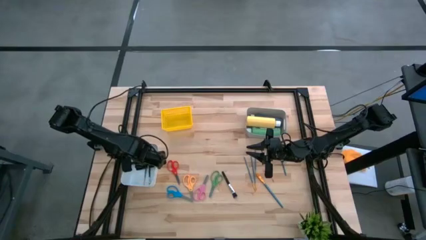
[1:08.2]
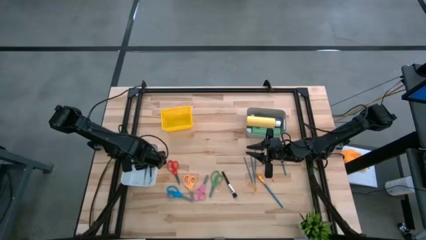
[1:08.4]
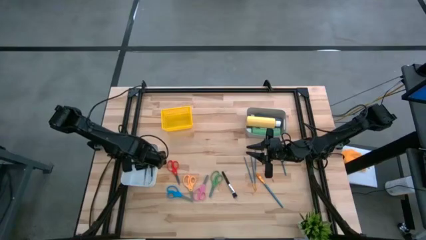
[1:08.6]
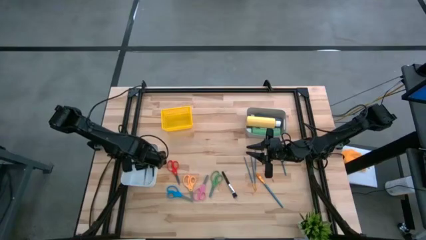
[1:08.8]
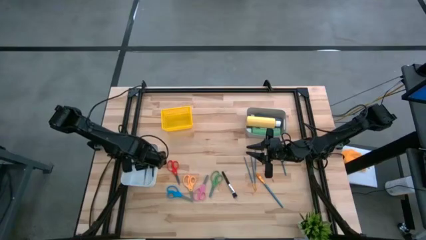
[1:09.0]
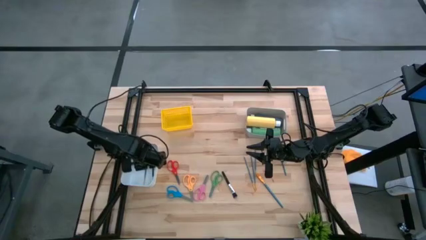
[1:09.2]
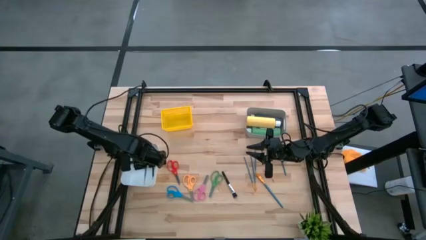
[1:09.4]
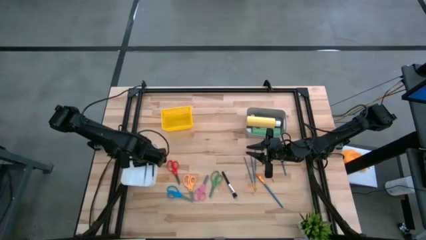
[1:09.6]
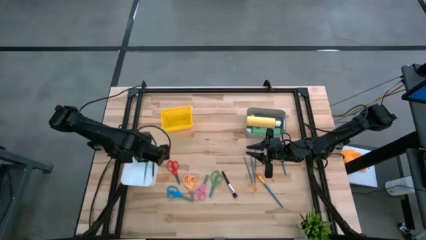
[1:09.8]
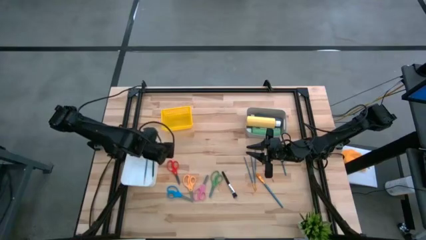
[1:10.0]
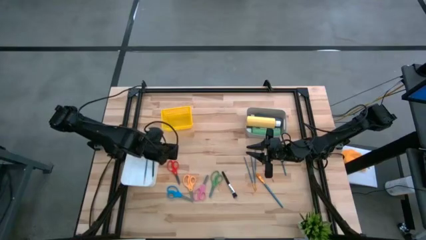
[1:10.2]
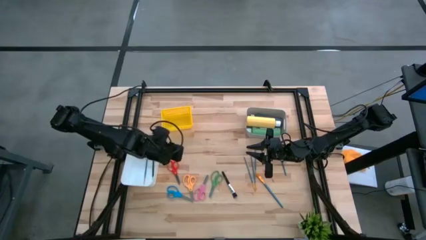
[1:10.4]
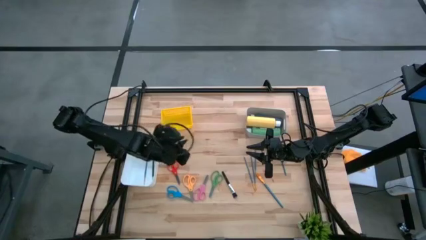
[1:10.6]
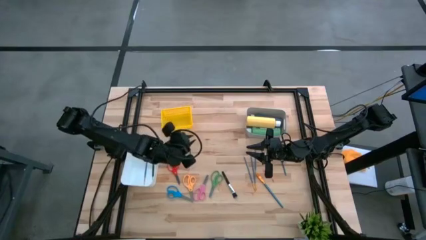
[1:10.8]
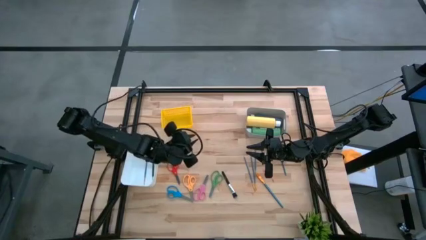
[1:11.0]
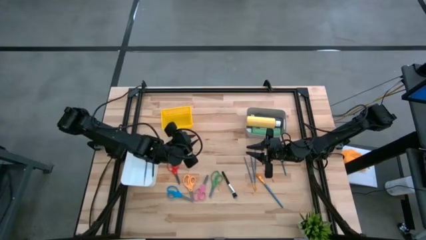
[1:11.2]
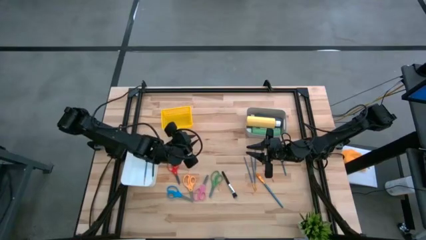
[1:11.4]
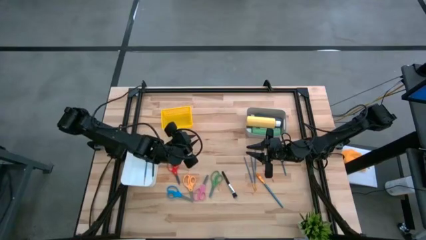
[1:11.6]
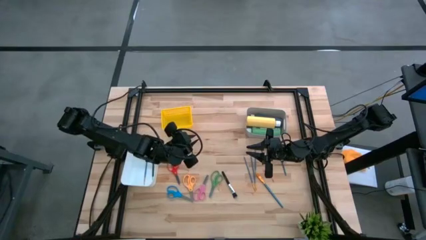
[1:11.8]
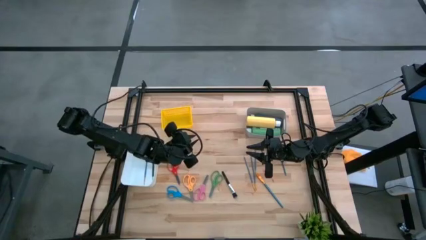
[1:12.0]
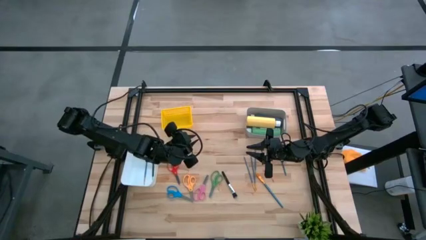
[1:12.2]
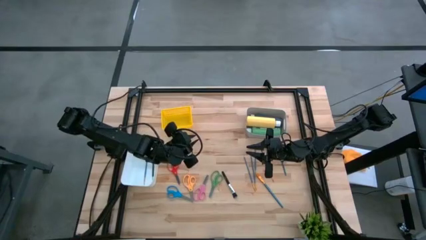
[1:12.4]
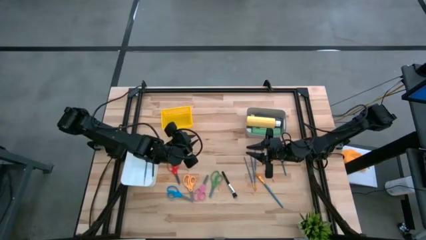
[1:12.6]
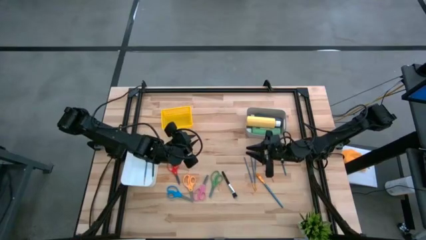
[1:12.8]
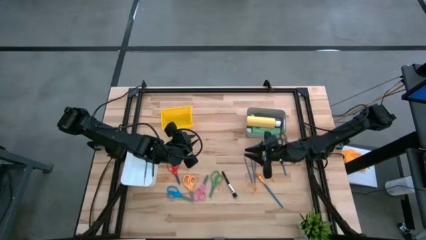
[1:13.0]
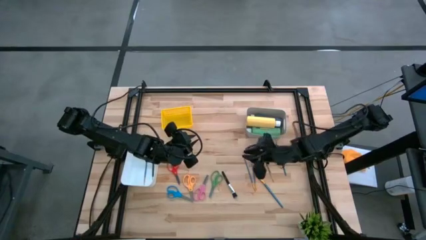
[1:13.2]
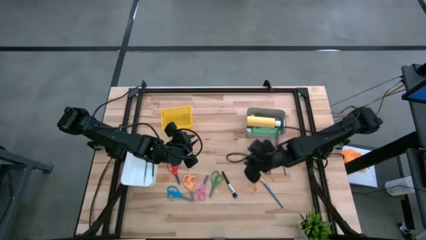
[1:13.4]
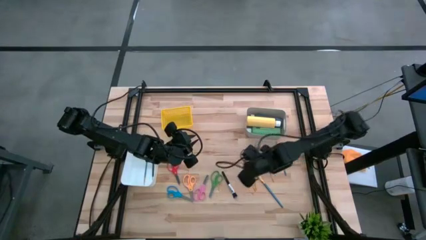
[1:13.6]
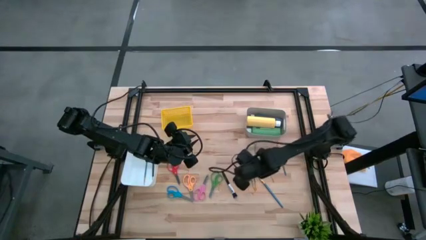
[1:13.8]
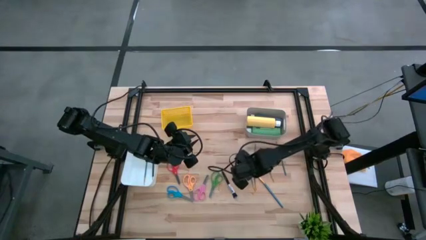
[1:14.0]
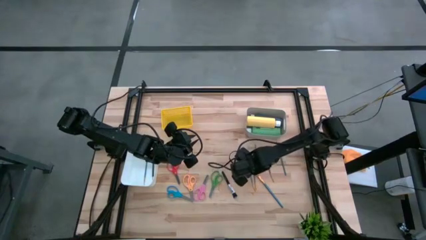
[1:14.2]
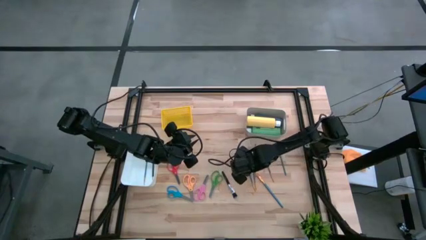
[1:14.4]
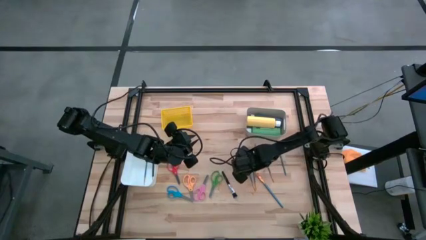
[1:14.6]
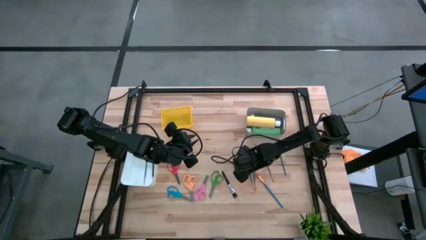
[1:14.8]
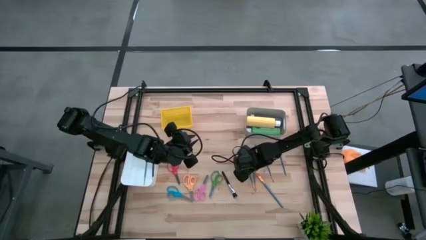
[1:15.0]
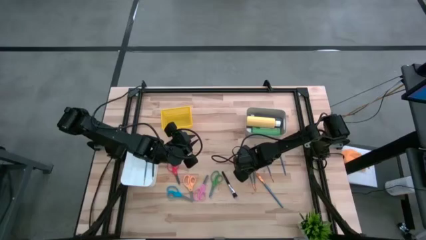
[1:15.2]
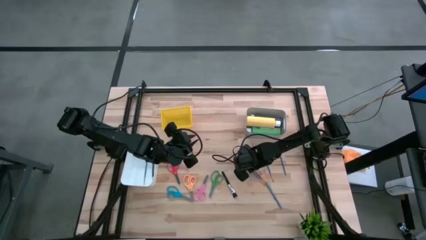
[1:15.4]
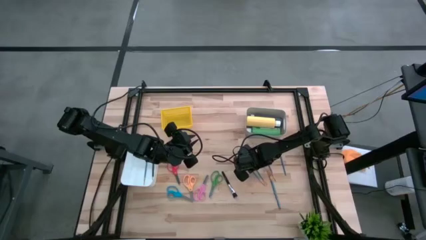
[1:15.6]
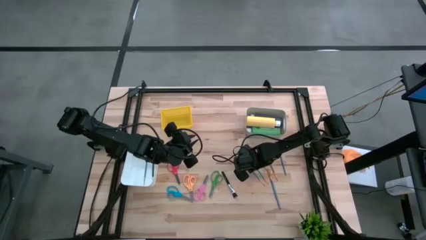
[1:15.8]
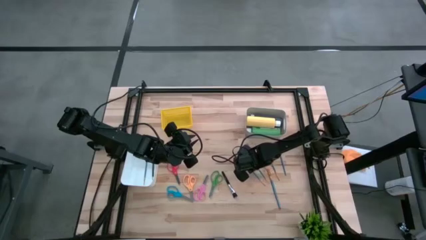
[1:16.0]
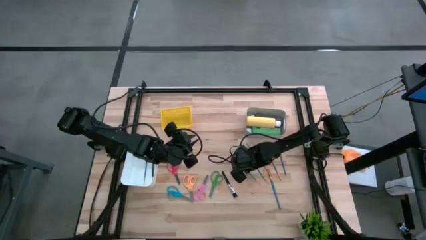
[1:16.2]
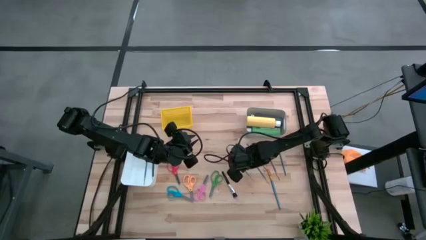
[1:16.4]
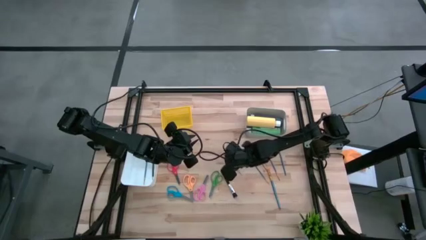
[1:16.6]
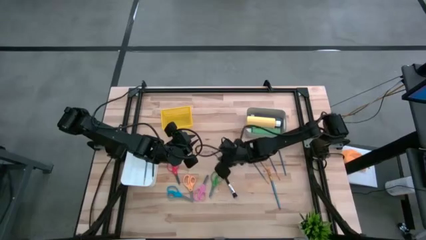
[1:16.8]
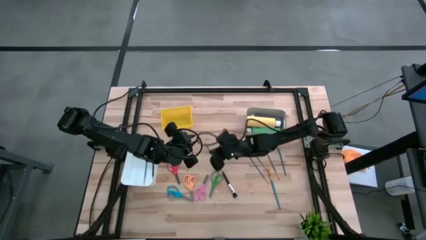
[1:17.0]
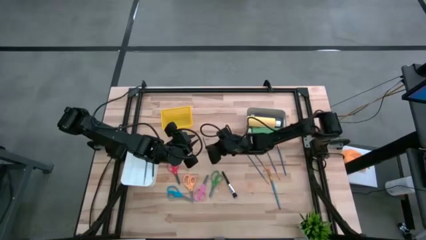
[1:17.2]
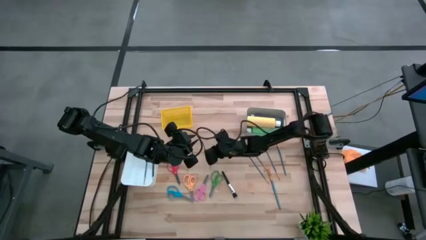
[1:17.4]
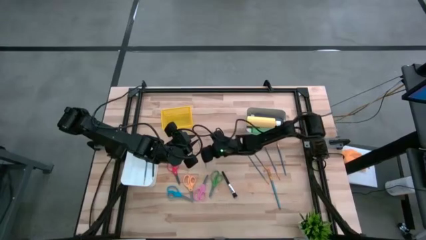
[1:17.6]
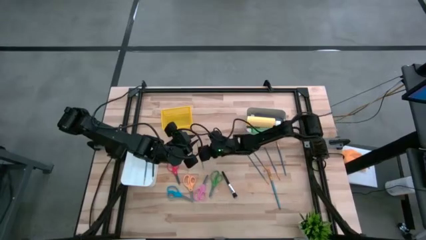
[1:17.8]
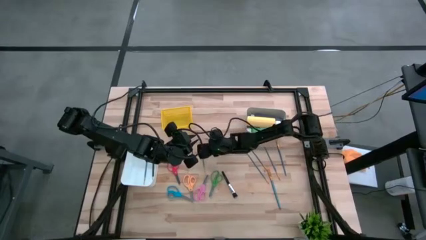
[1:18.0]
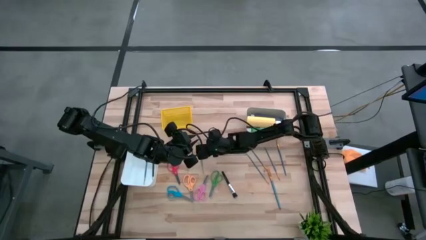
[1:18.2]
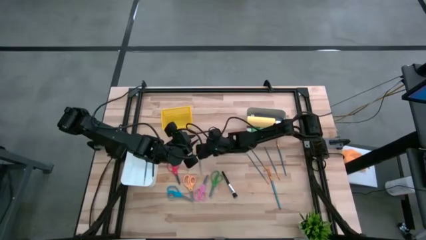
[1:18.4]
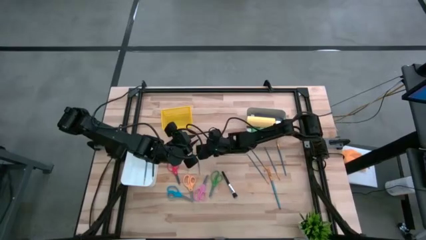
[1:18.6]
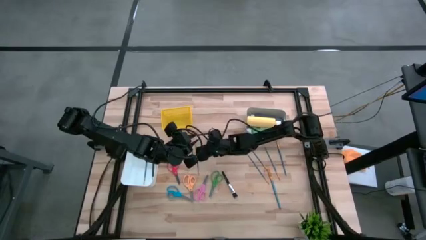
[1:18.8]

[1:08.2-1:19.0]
Task: Pick & Place Paint Supplies
Put the blue paintbrush into the white bin
